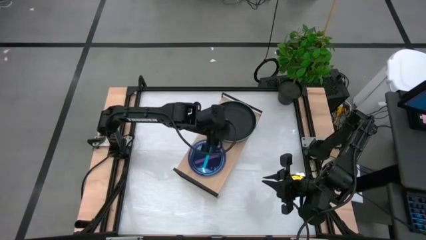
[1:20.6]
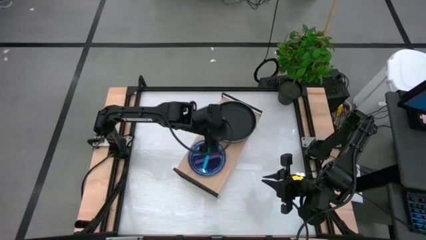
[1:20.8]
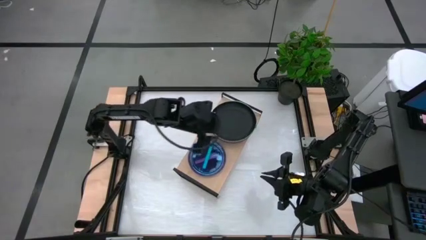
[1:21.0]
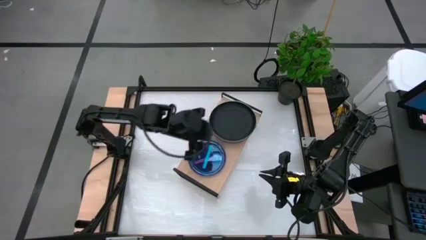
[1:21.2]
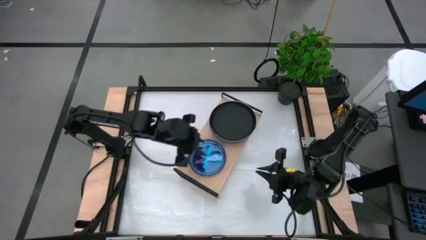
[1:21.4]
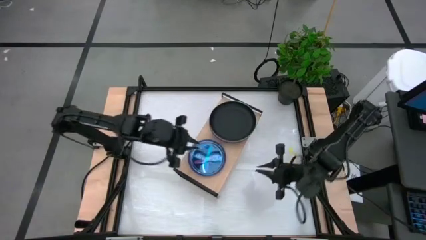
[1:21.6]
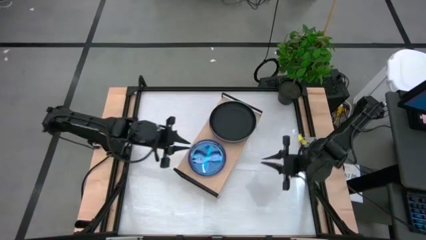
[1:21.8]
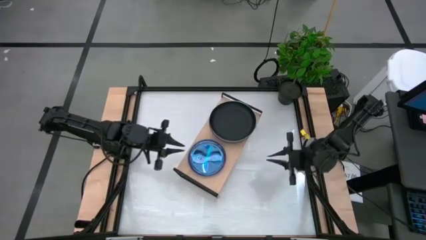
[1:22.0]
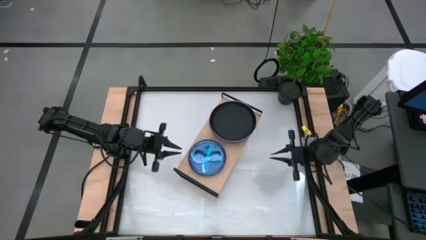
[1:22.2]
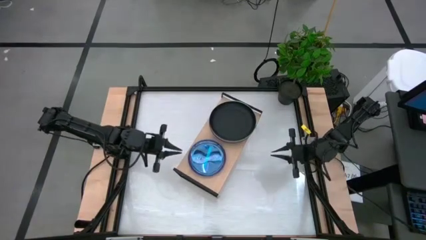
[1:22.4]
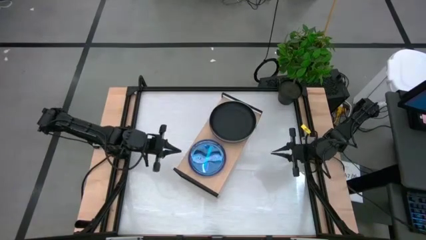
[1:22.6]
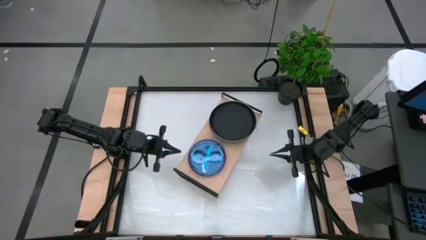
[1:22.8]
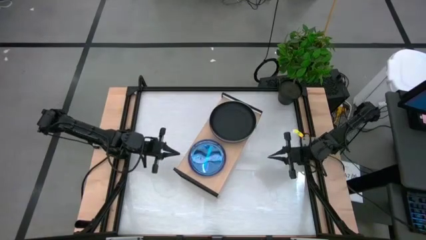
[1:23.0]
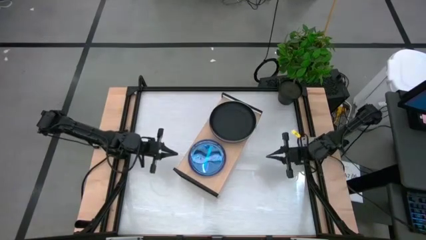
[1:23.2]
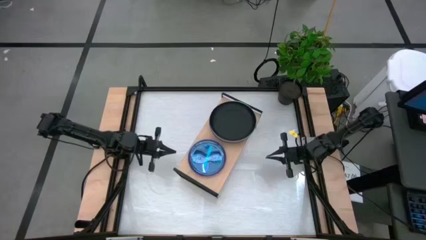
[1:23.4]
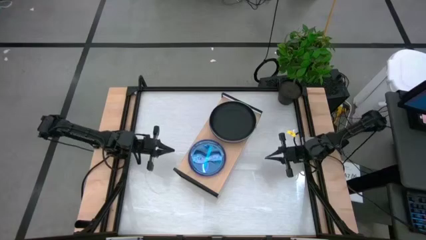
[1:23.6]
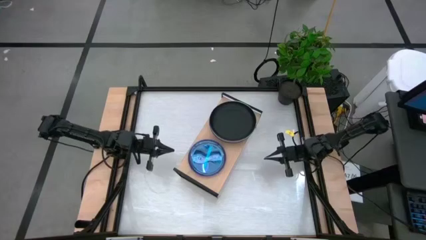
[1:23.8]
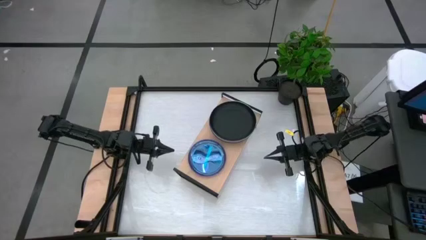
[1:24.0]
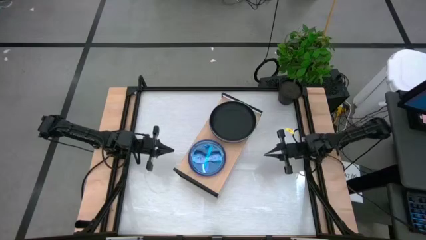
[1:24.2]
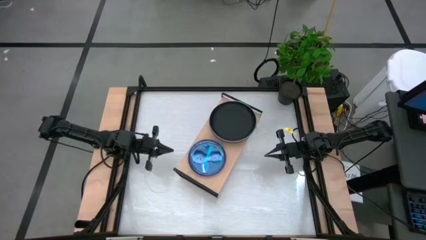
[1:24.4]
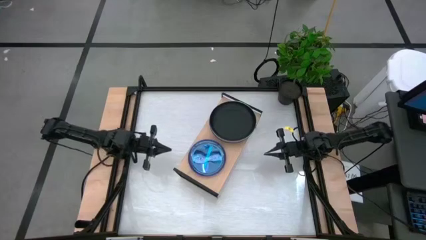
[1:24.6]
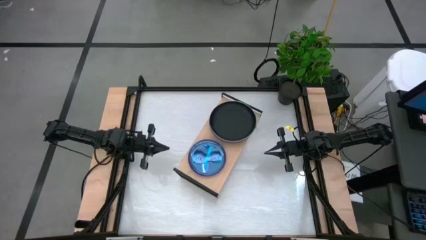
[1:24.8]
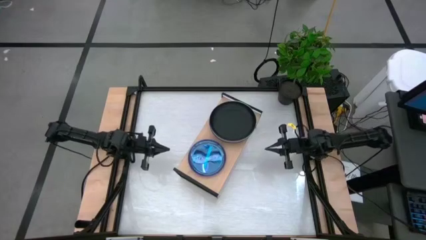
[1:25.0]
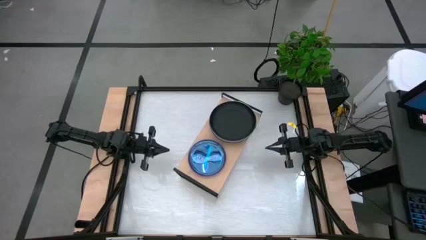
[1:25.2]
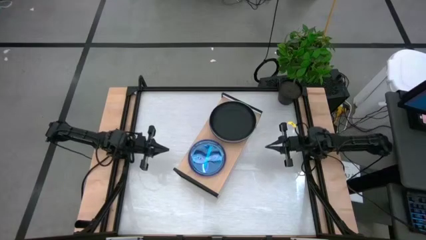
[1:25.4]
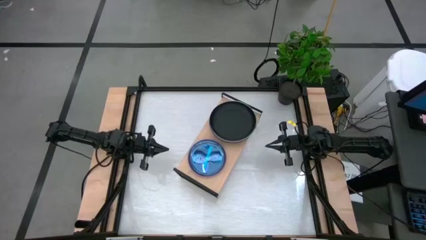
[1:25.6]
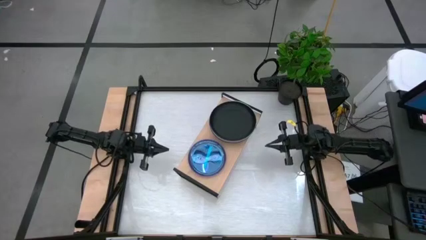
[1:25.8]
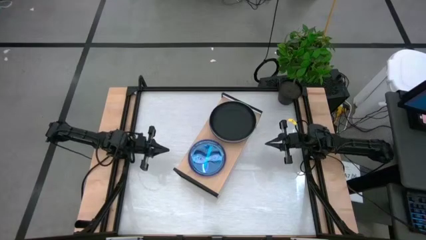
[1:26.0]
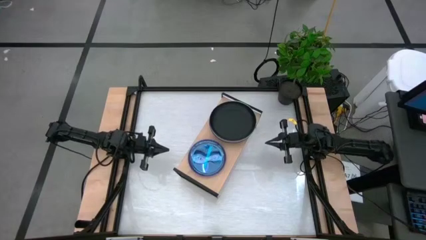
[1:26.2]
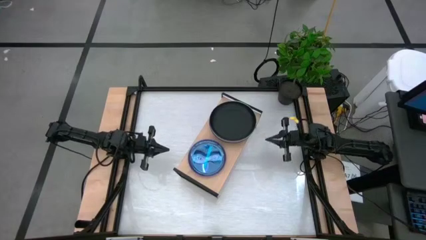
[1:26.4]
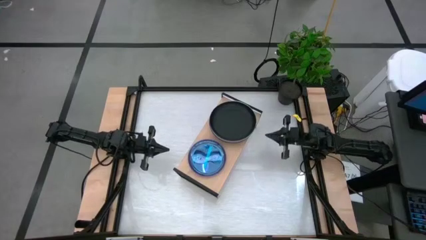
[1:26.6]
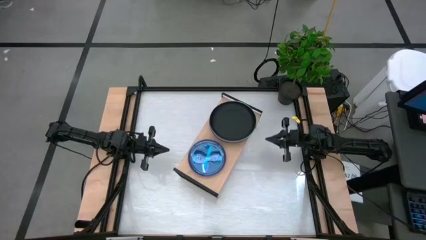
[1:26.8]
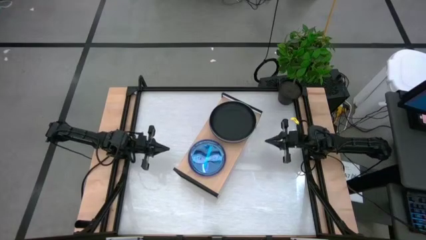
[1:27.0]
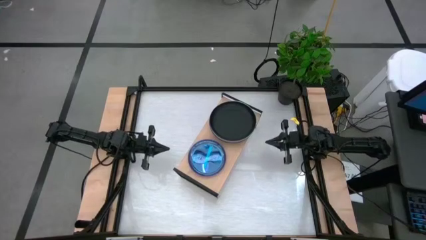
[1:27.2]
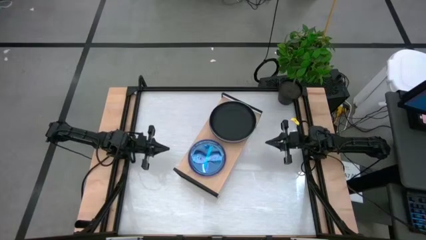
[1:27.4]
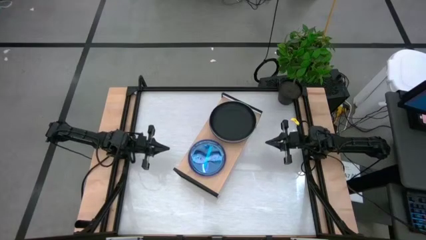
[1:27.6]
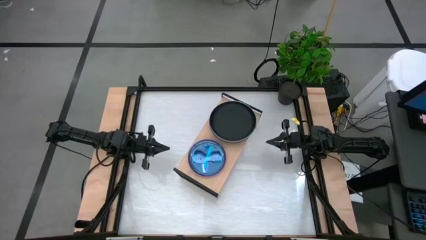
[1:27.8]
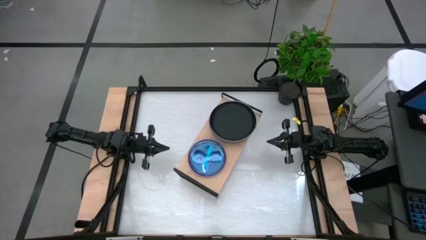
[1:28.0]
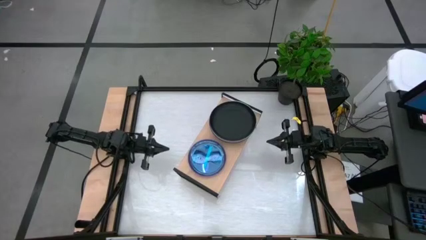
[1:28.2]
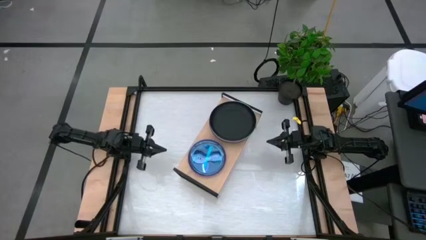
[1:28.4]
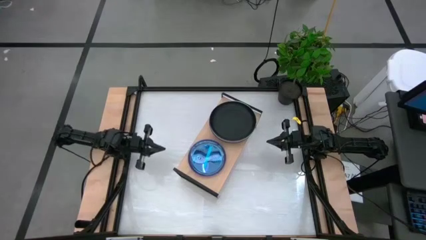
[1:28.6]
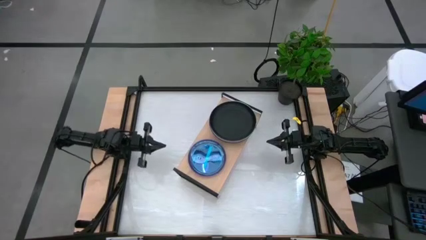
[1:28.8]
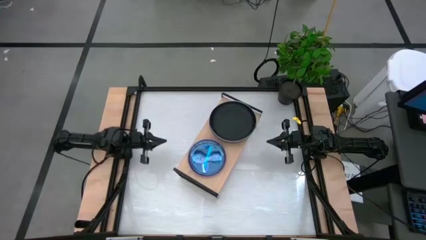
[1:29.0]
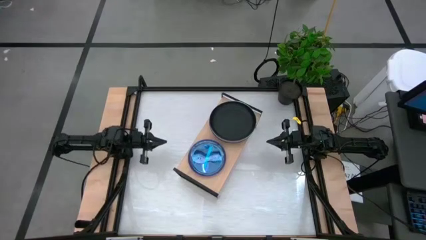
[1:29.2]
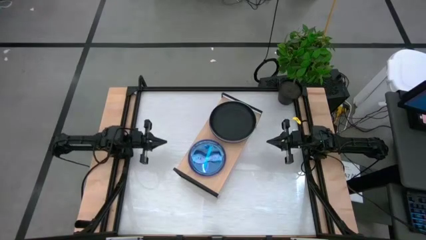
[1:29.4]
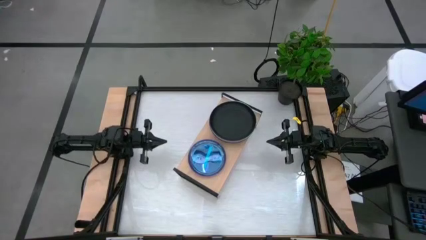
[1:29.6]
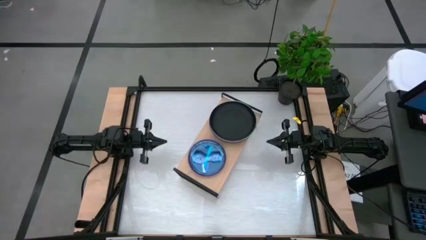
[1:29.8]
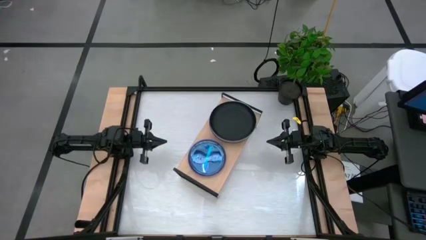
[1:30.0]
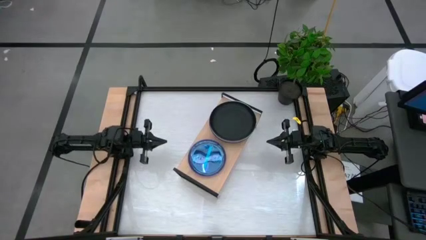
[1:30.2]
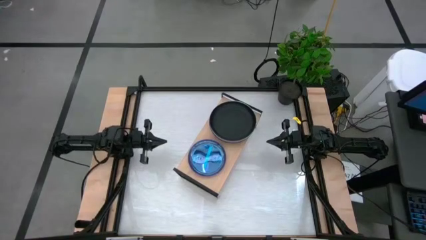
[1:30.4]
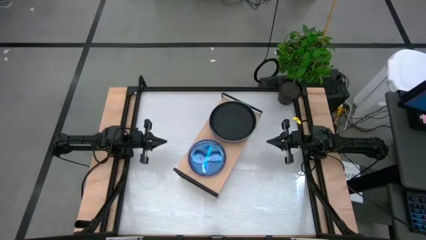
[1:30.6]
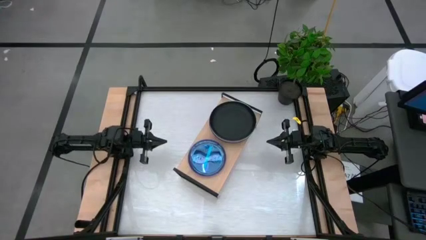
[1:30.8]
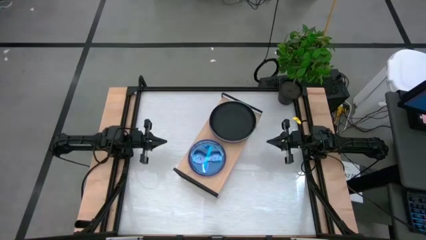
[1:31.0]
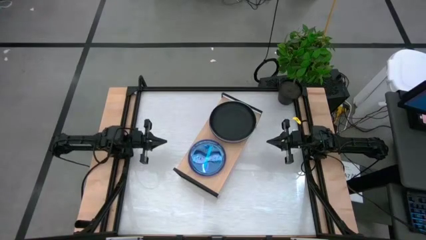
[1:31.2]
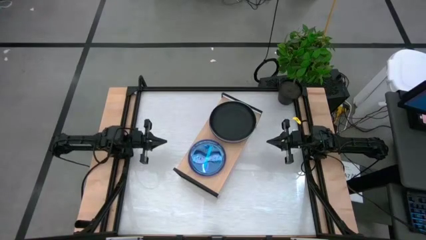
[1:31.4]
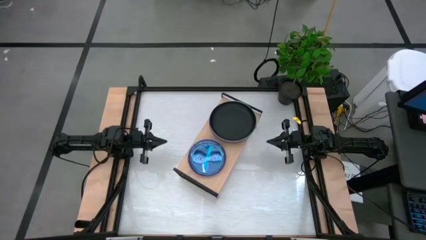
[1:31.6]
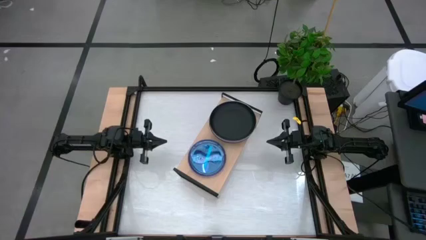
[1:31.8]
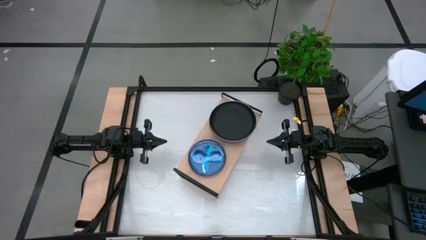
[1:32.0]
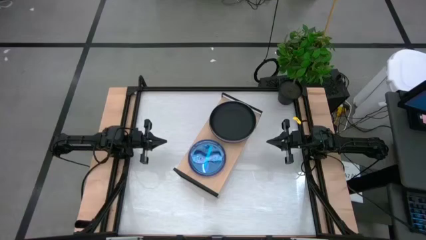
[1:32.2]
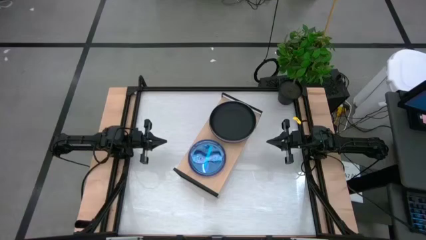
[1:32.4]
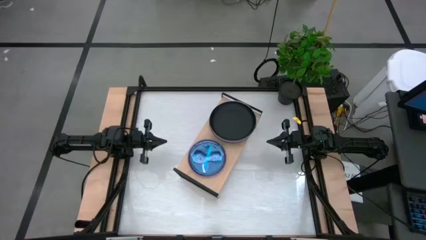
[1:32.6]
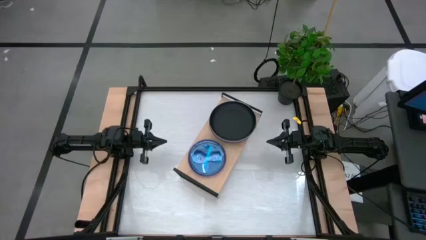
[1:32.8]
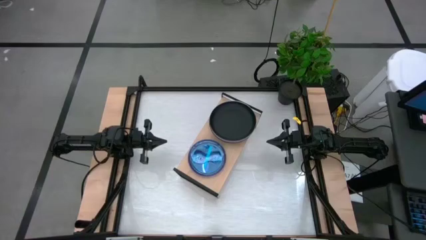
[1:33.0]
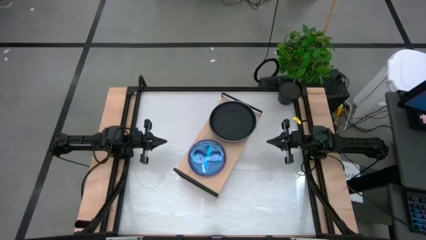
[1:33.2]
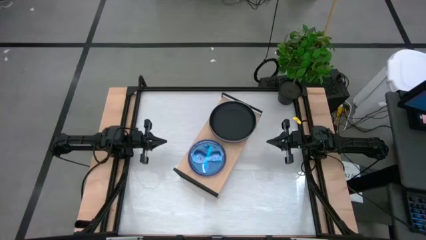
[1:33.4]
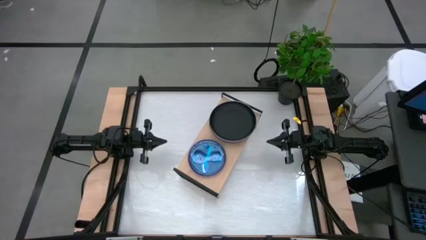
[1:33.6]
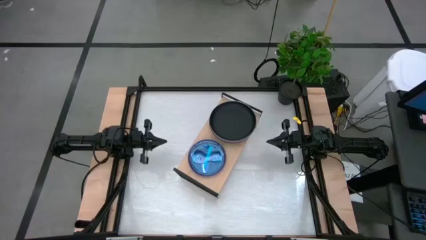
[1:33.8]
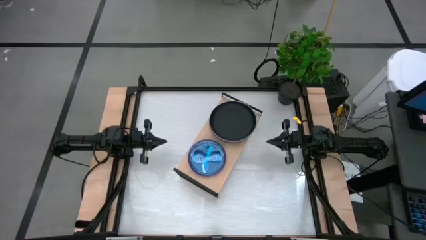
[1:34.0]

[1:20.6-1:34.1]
Task: Place and stack plates onto a shelf
Return to Home Position

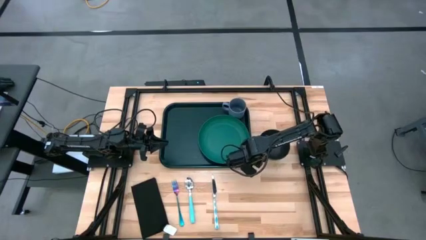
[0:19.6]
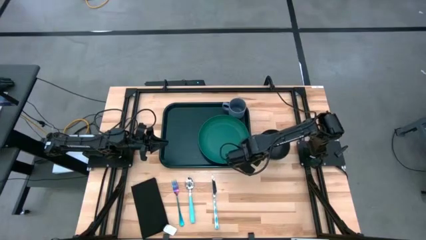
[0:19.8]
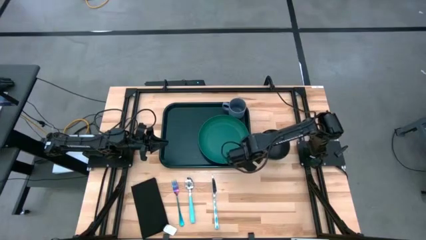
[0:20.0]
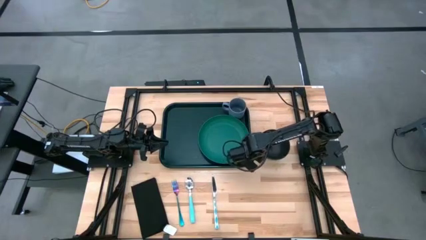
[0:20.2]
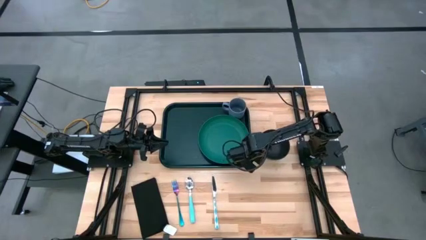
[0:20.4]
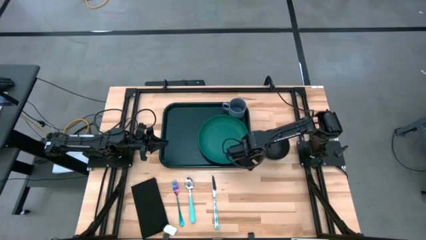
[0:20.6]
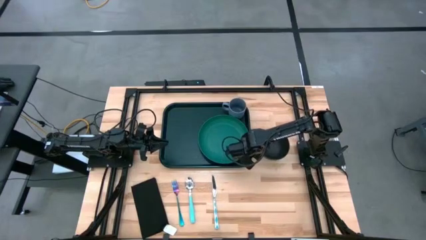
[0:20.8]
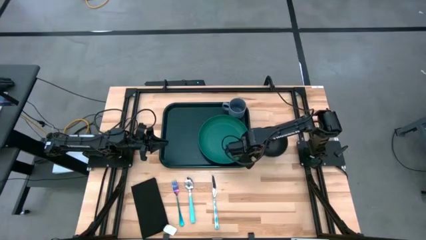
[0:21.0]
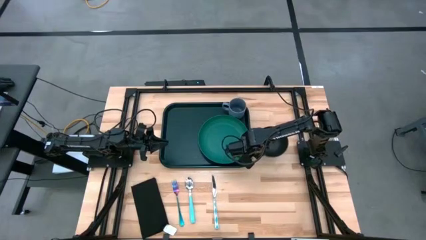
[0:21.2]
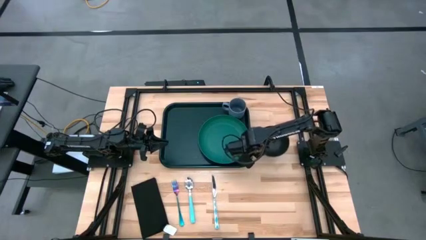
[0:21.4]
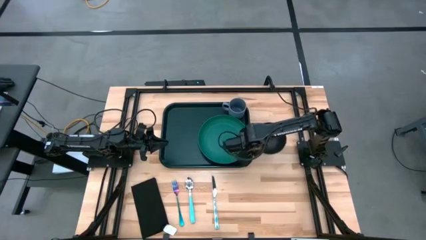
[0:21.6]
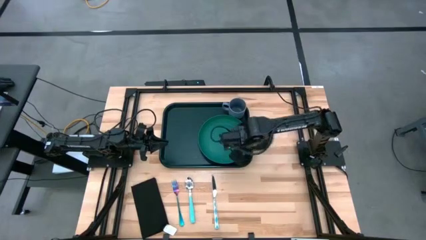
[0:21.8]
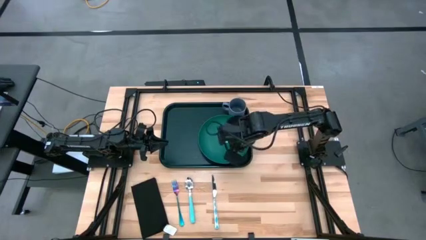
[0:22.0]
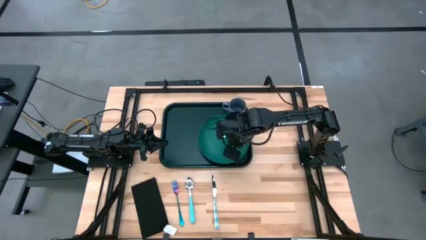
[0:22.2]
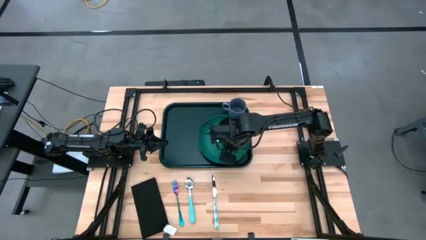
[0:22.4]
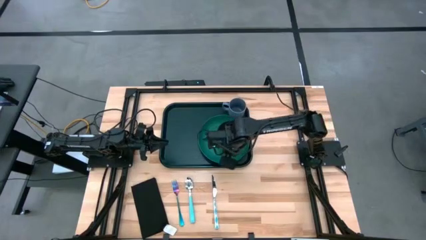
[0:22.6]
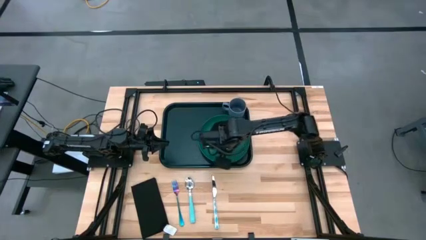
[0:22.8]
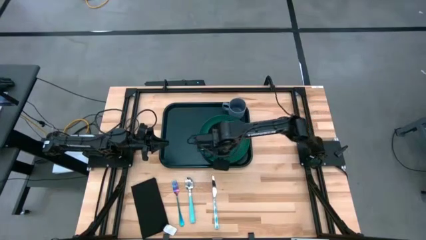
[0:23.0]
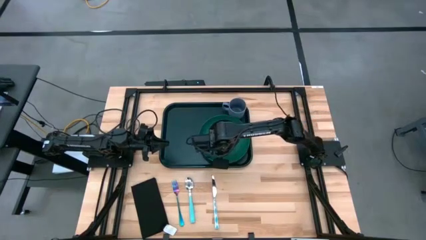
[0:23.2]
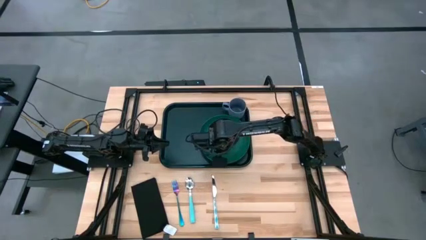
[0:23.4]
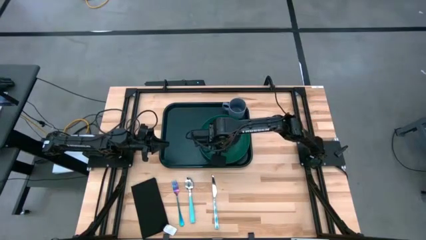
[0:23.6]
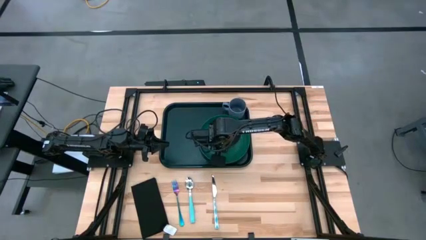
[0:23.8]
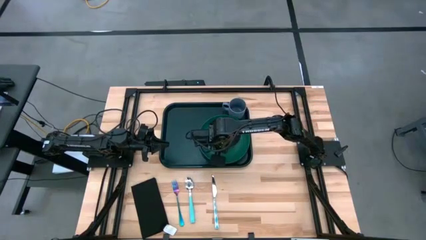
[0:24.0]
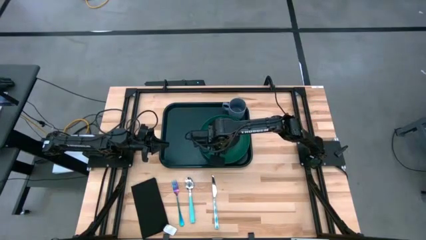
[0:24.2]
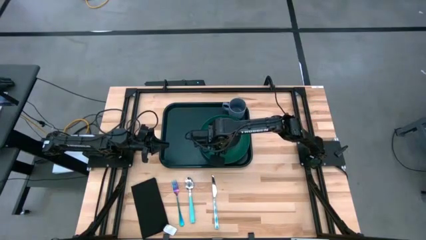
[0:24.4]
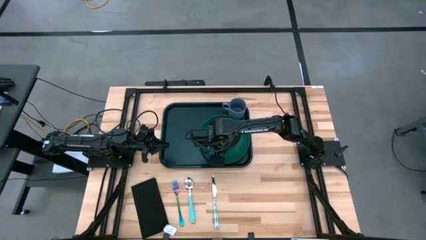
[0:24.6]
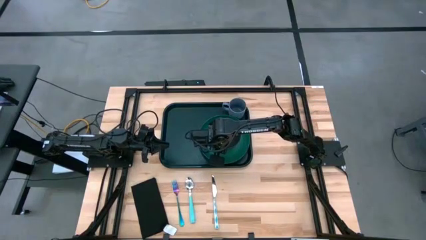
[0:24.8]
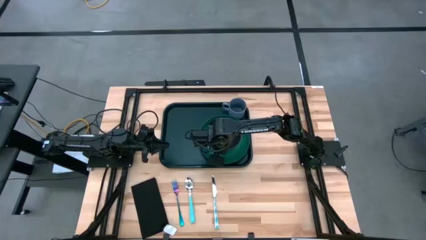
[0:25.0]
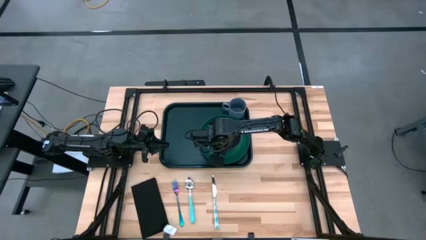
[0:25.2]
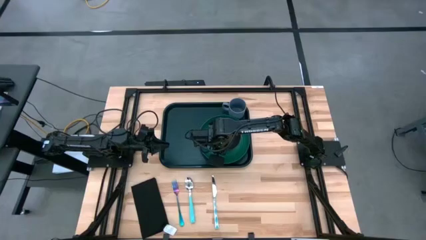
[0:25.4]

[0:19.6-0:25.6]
Task: Set up tray
Put the black bowl on top of the green plate on the black tray
